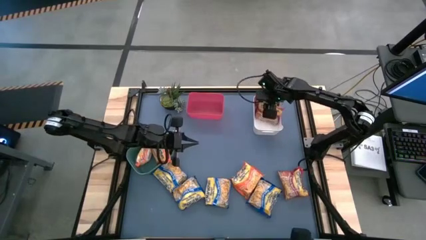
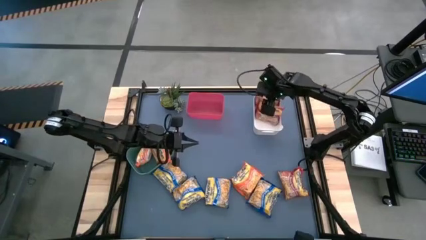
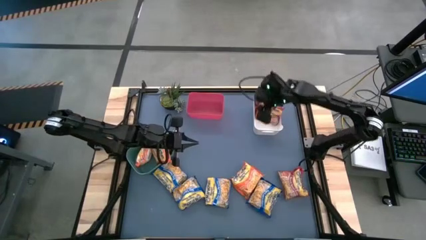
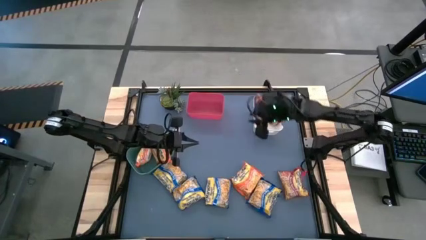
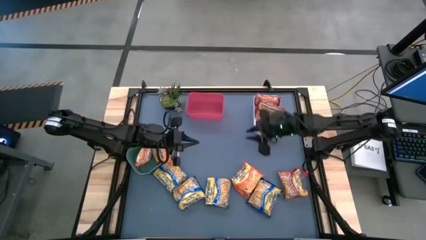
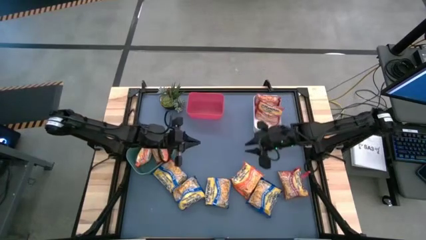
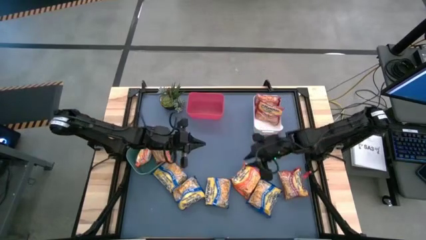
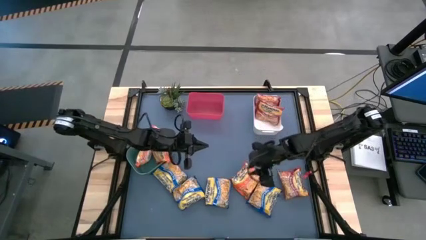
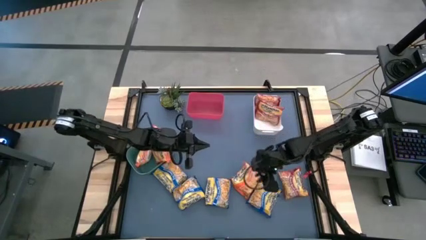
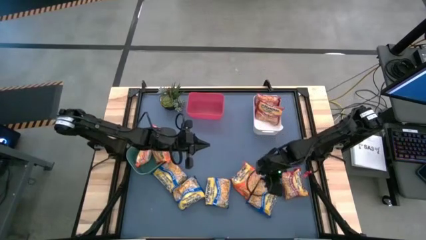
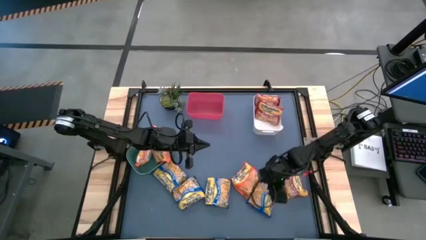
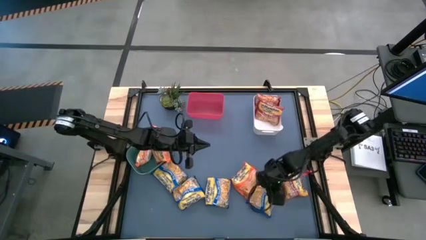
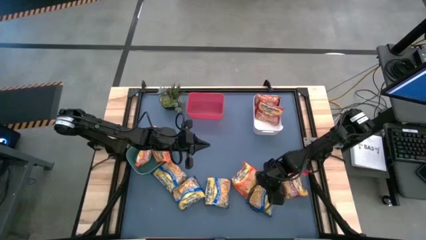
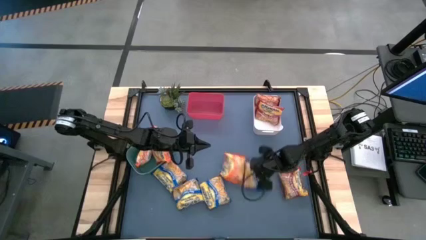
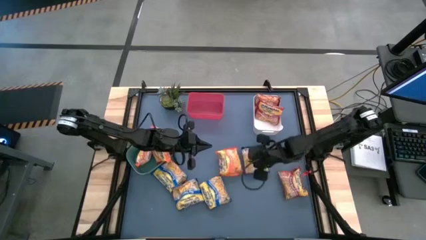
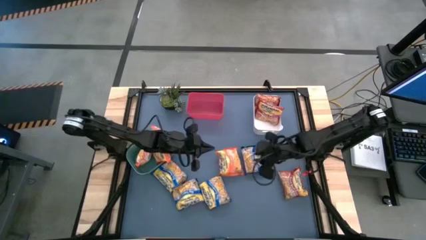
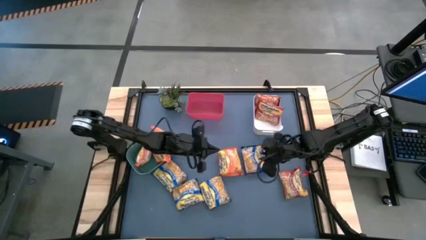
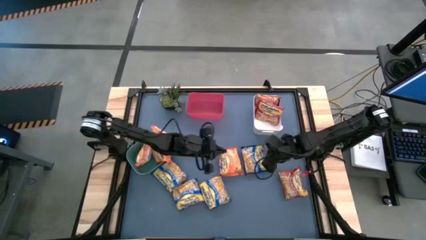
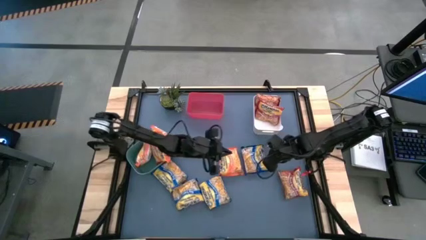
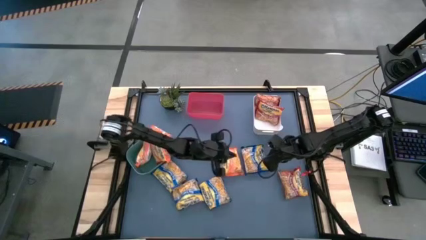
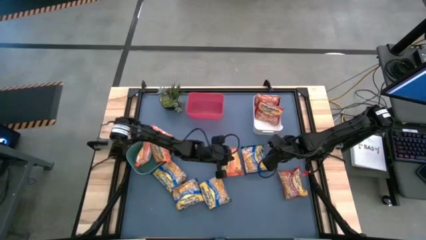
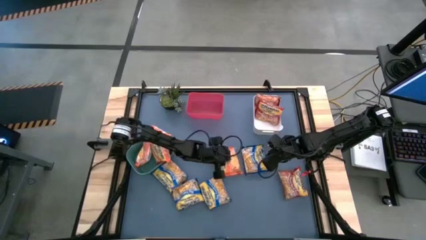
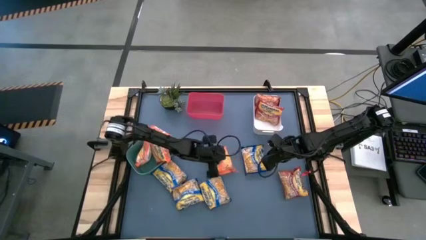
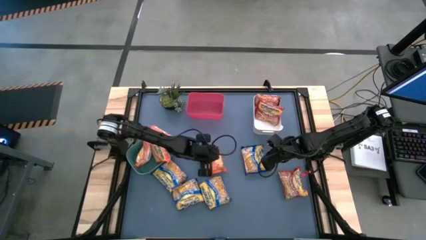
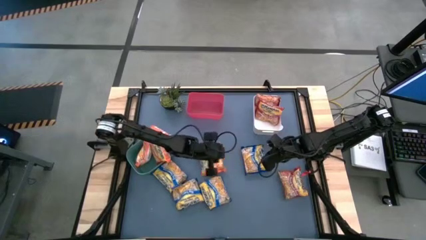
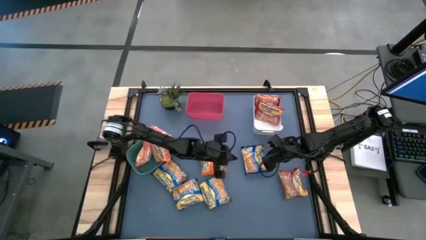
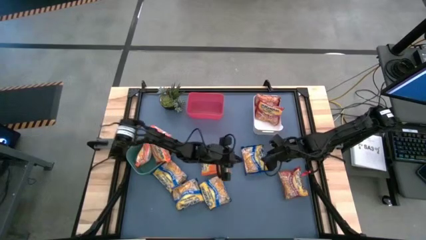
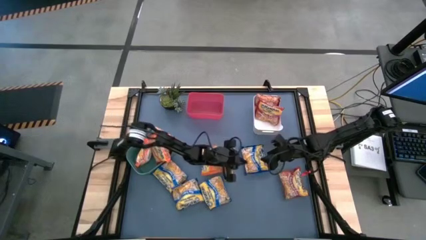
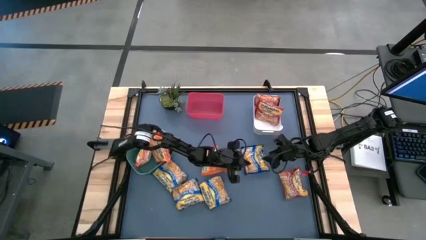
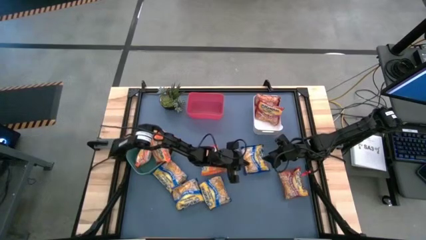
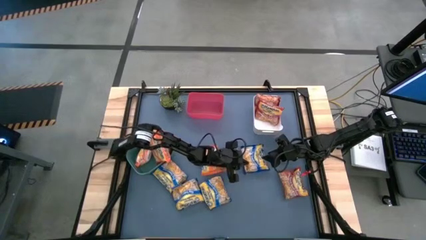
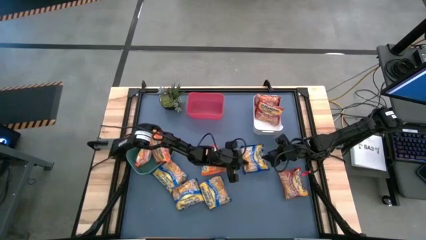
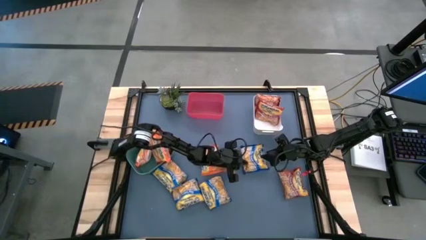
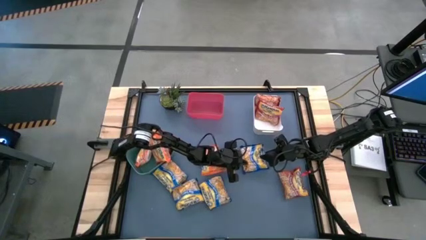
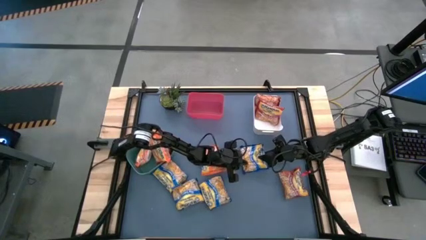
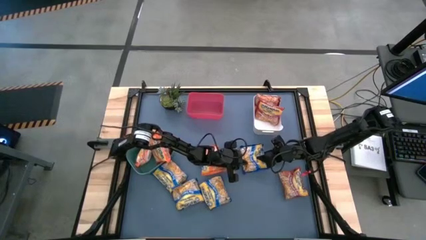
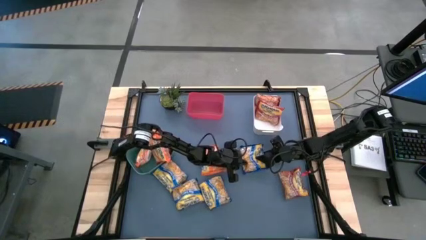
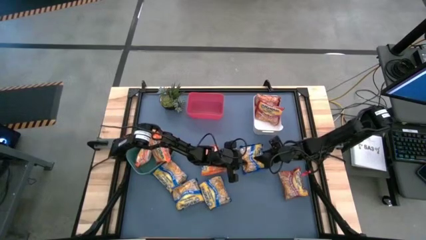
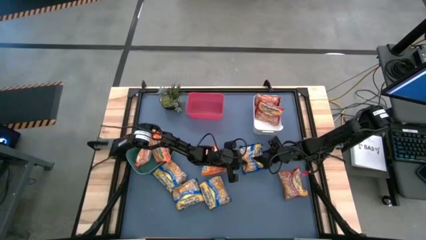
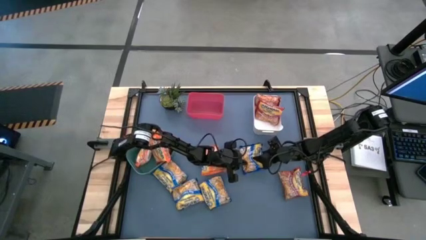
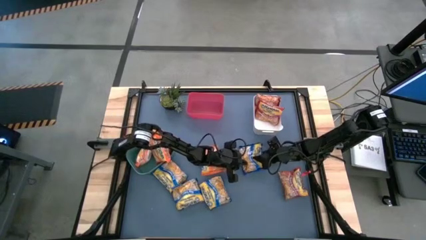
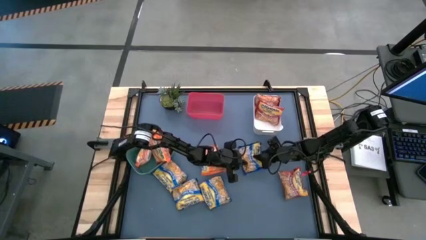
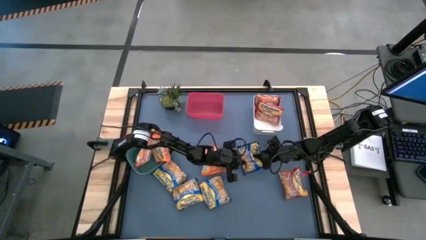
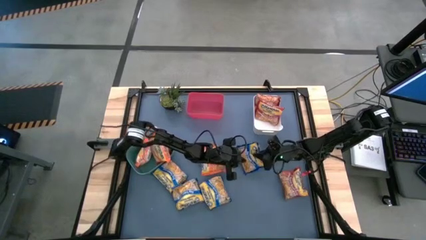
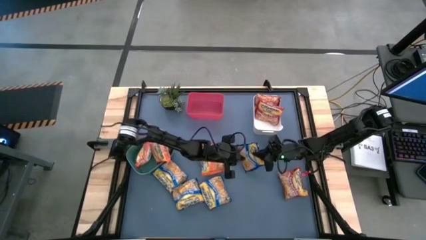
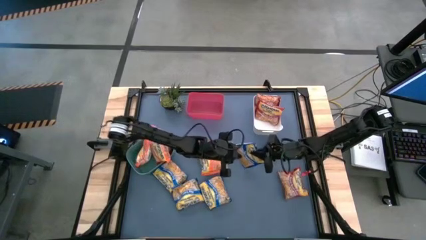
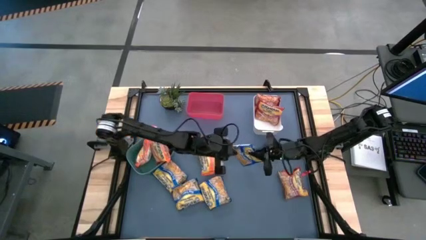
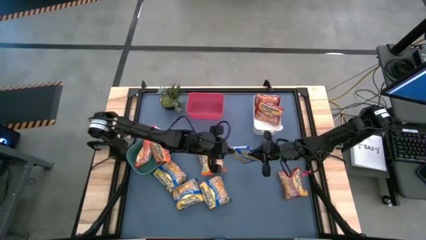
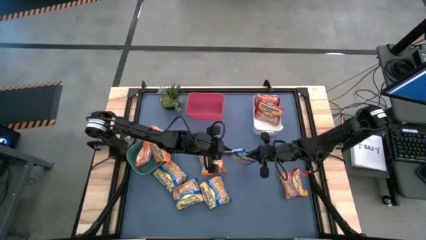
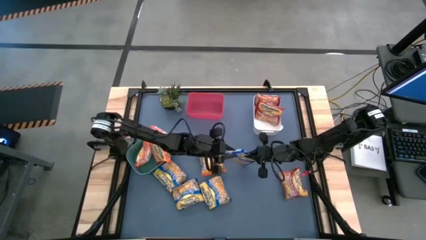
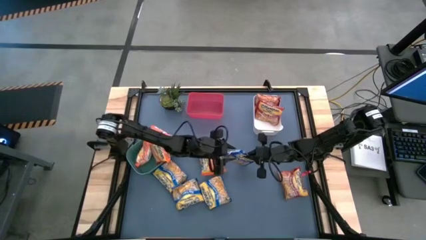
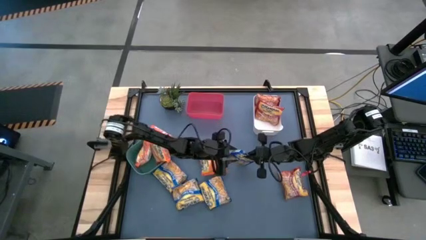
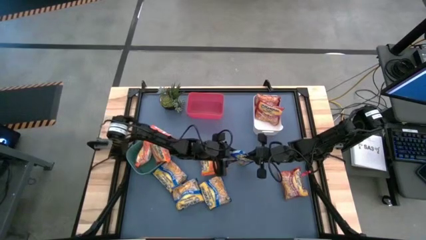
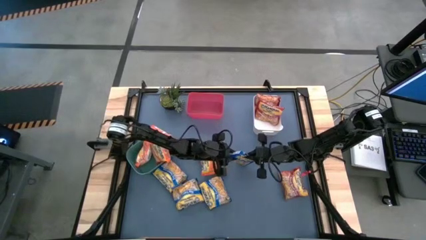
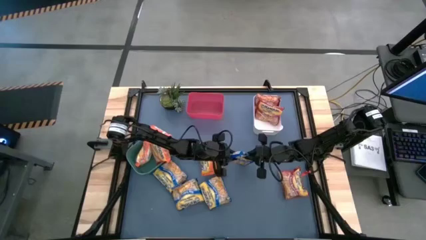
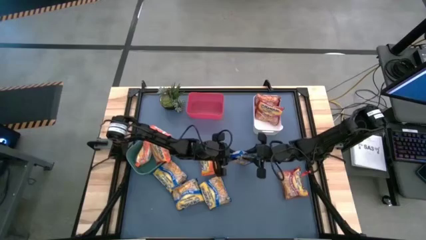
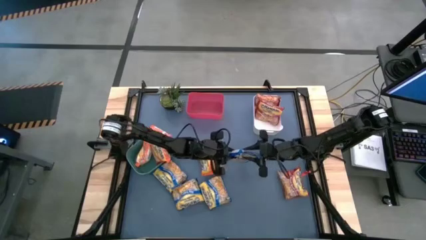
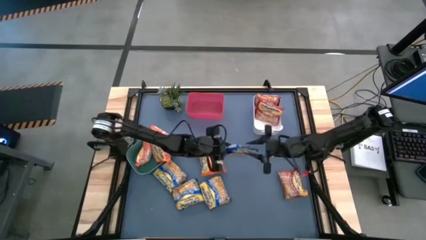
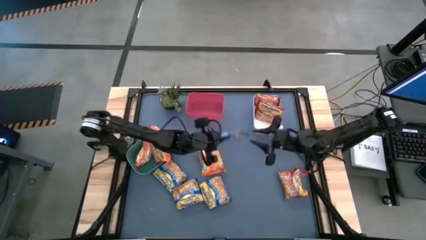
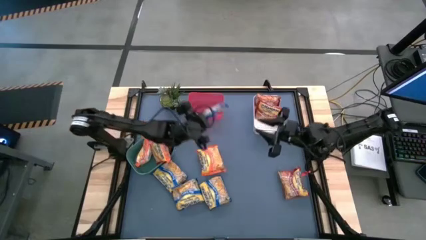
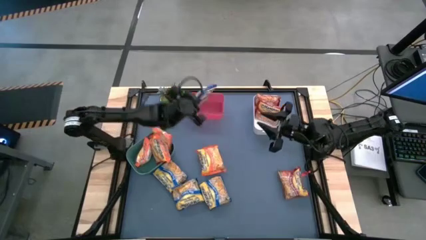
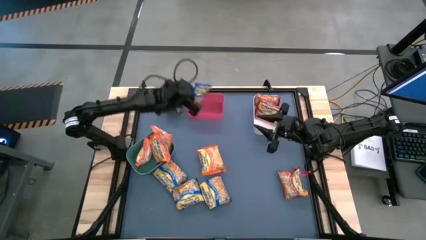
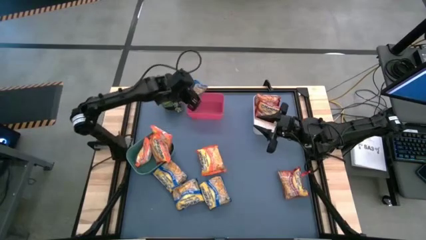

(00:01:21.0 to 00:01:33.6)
Task: Sort Maruchan noodles
Put the blue noodle pack into the red bin

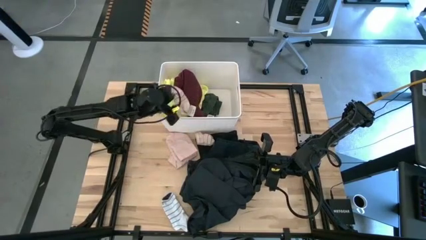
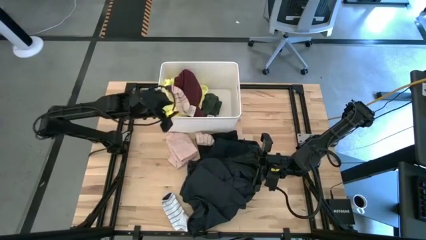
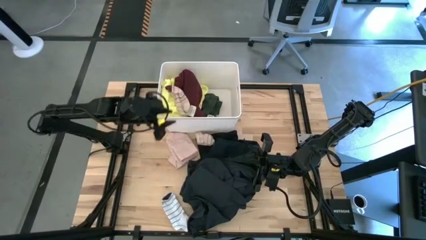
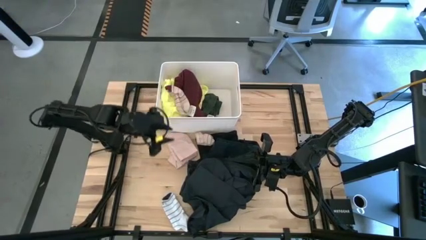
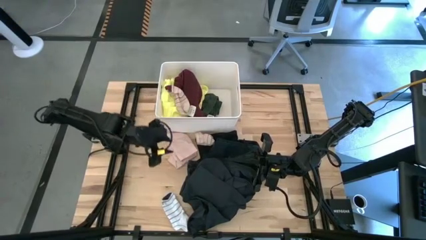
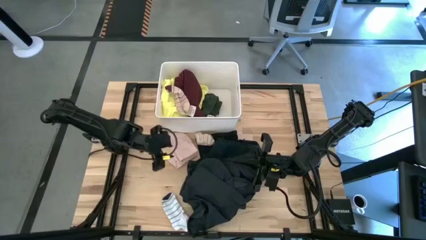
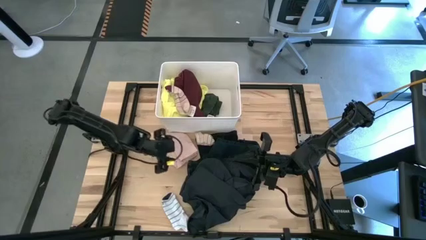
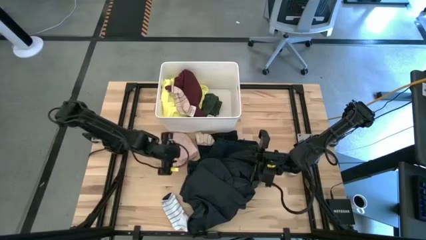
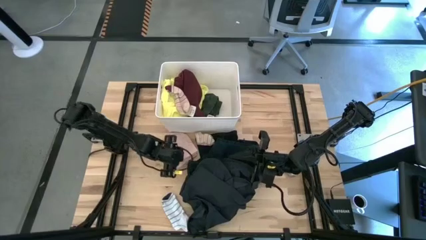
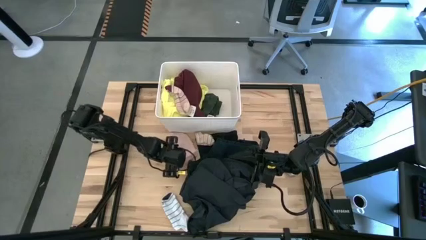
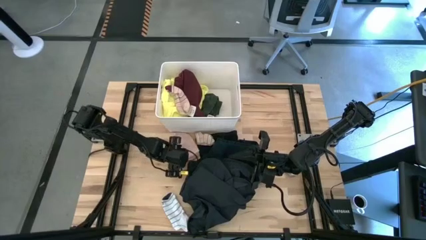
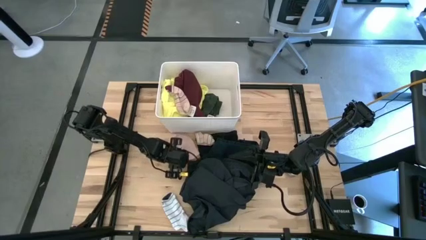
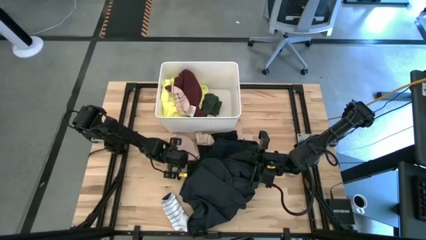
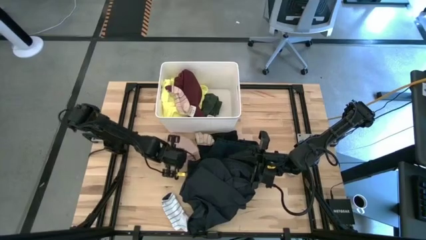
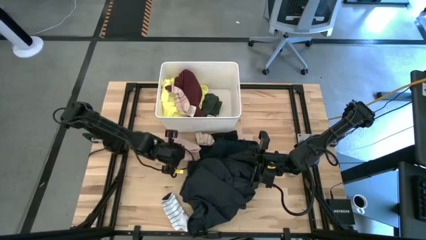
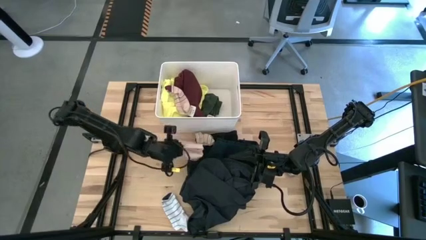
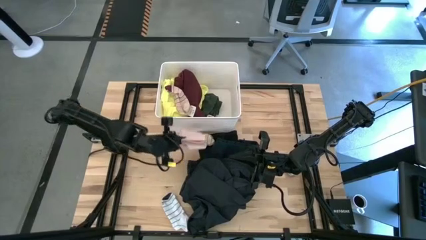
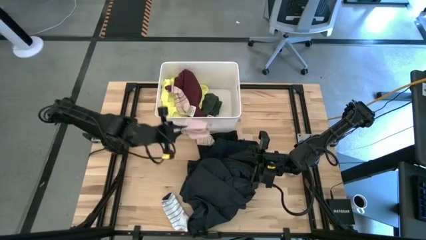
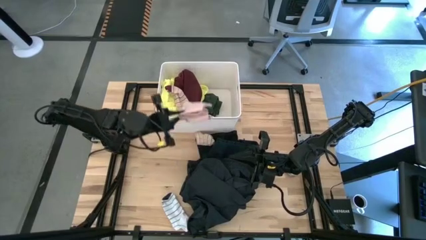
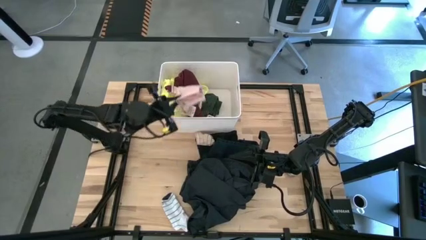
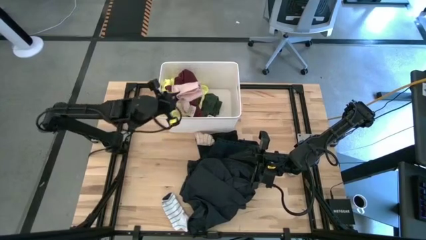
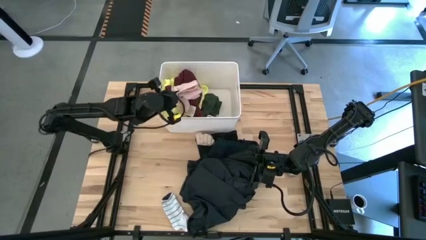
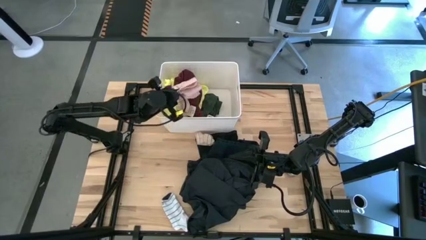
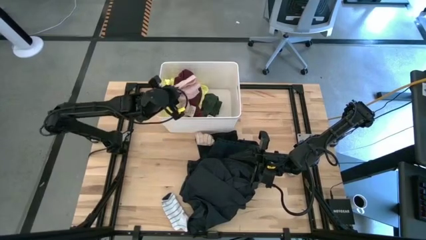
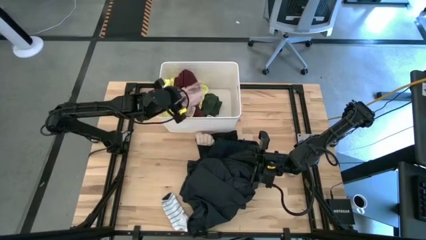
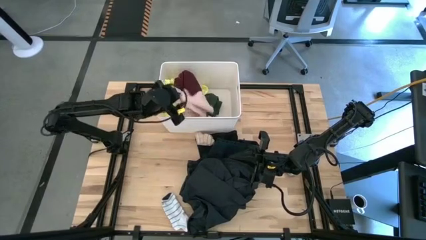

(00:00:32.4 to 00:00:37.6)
Task: Sort clothes
Put the pink panty into the white laundry organizer
